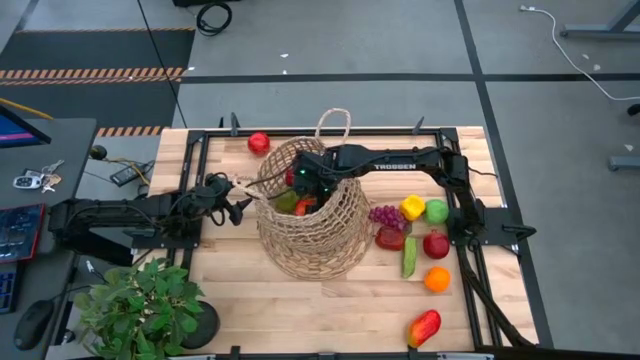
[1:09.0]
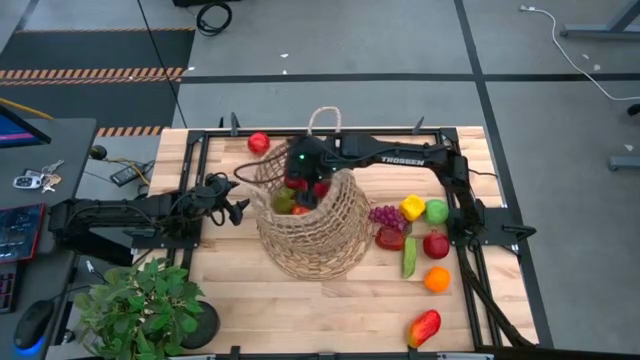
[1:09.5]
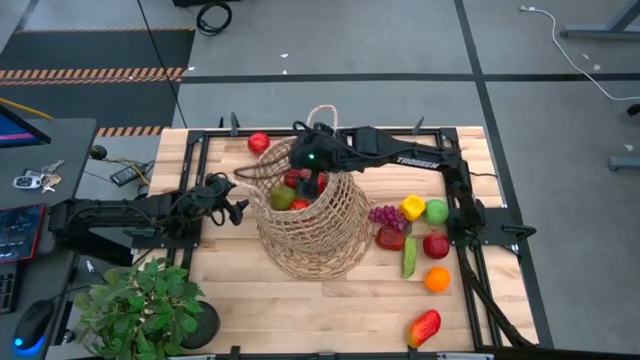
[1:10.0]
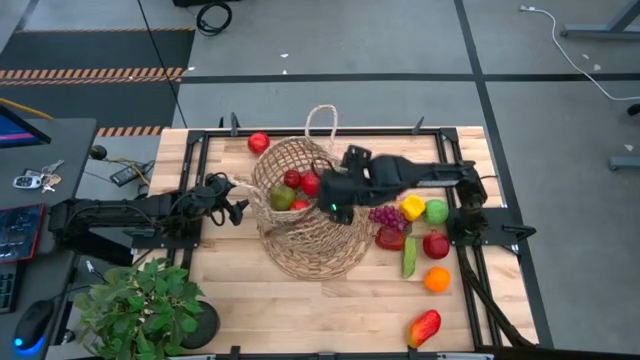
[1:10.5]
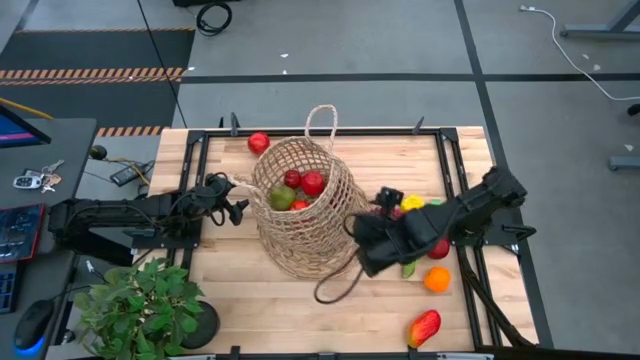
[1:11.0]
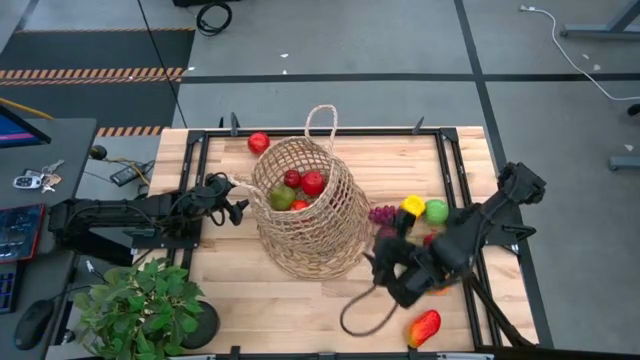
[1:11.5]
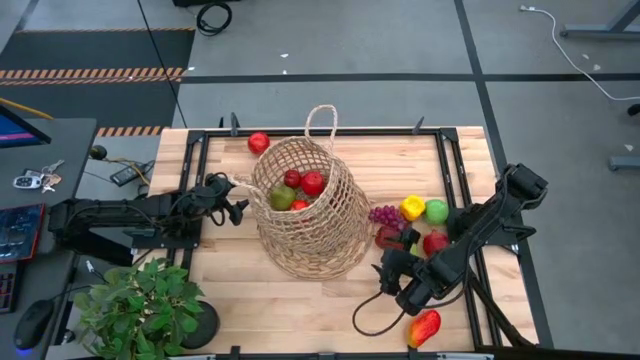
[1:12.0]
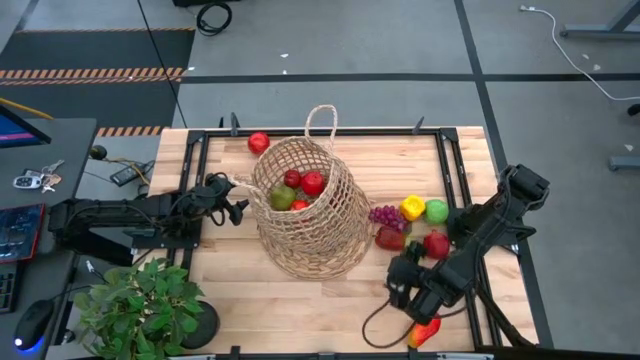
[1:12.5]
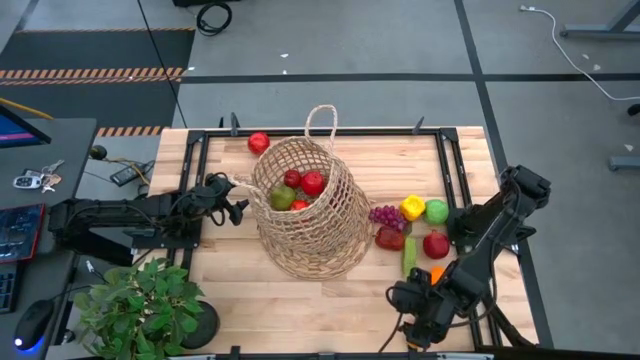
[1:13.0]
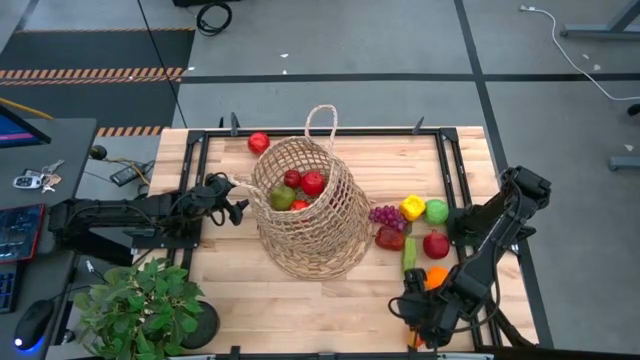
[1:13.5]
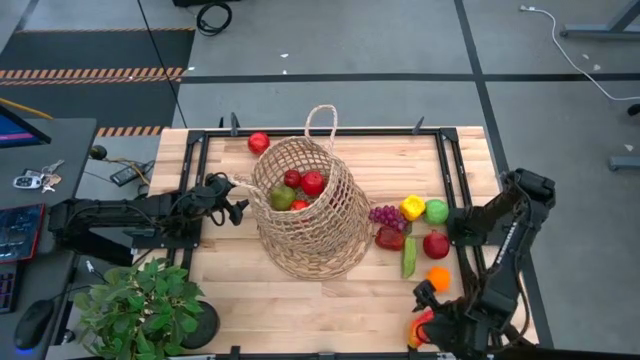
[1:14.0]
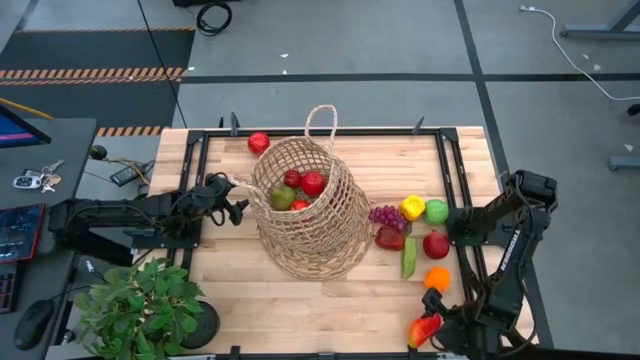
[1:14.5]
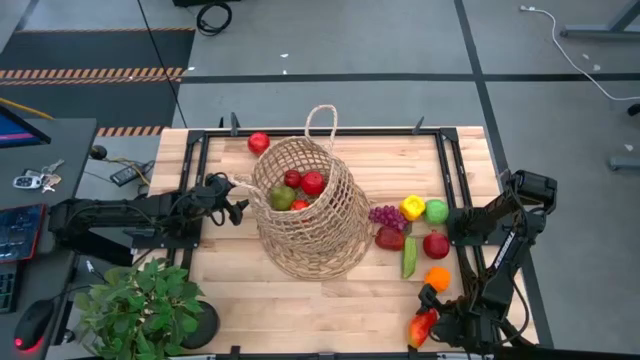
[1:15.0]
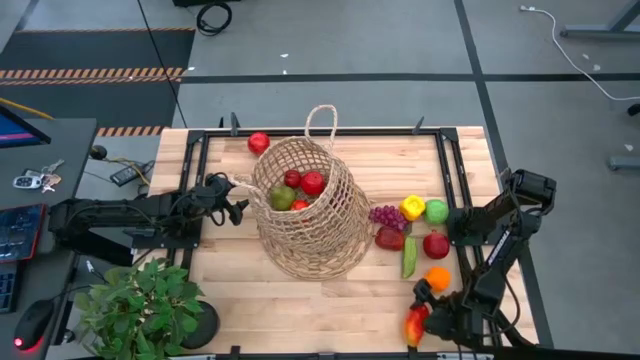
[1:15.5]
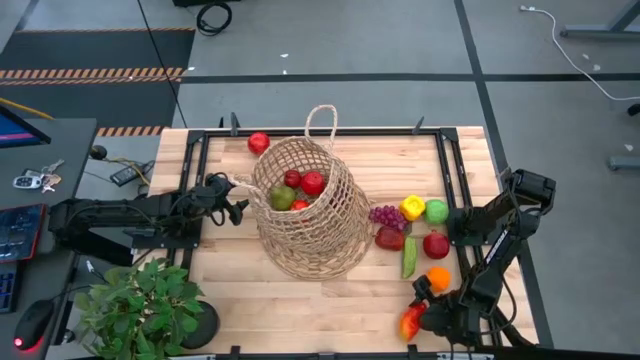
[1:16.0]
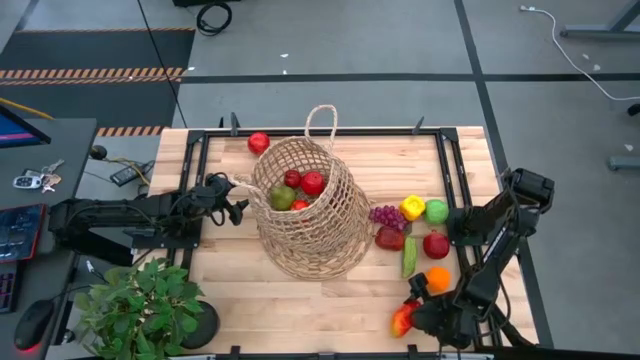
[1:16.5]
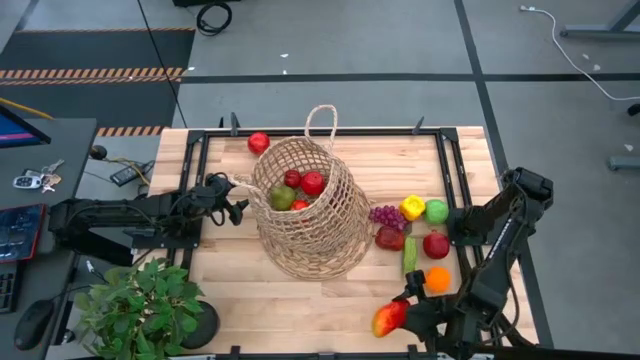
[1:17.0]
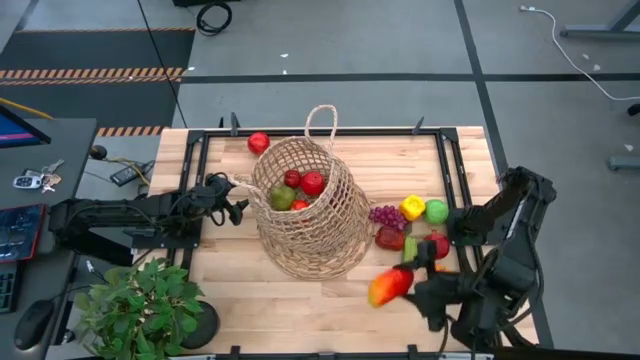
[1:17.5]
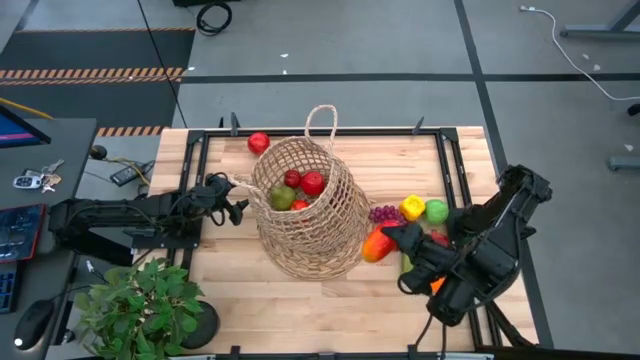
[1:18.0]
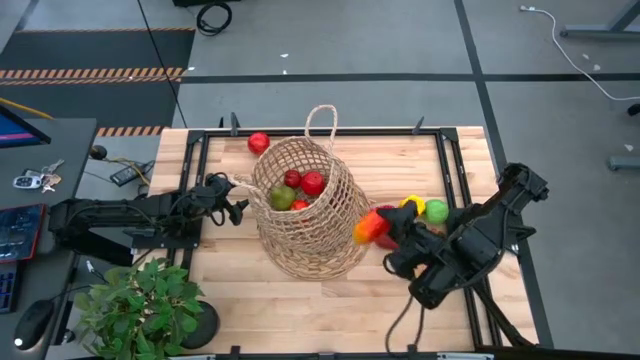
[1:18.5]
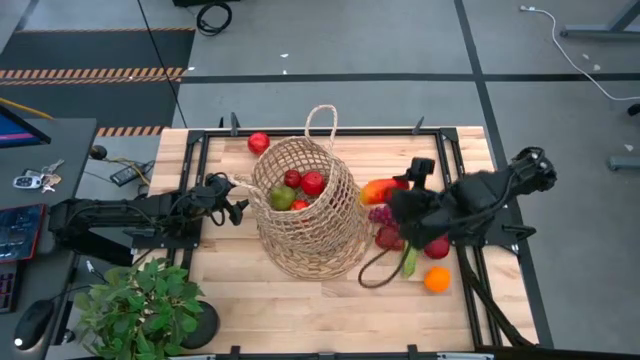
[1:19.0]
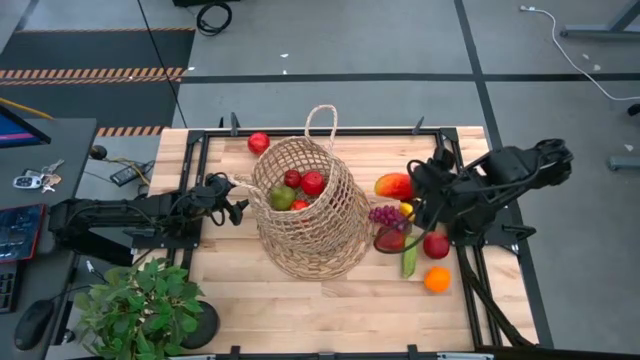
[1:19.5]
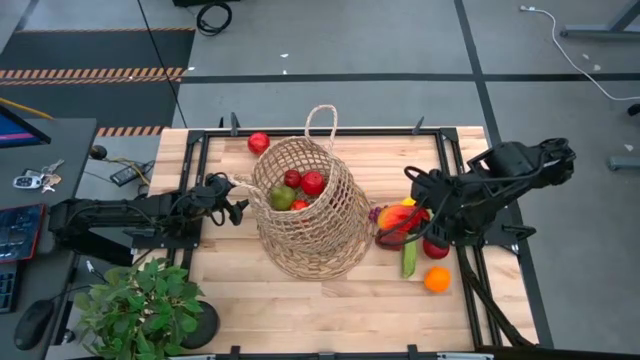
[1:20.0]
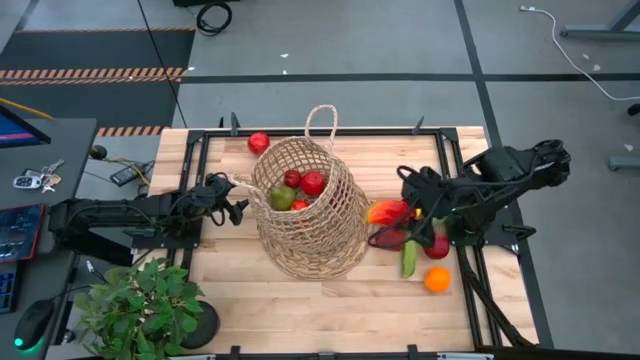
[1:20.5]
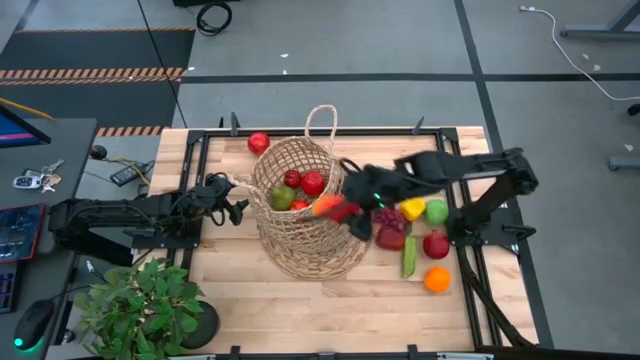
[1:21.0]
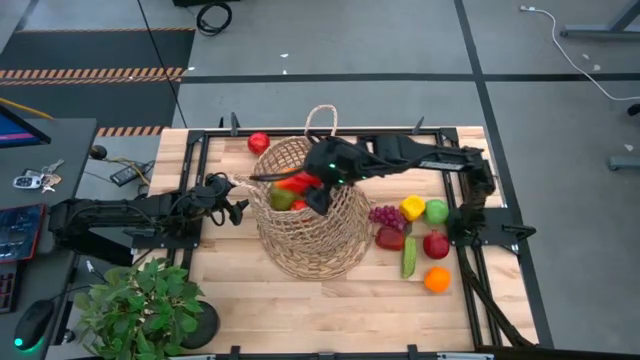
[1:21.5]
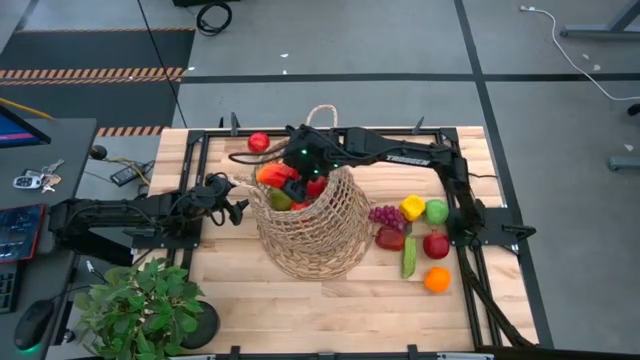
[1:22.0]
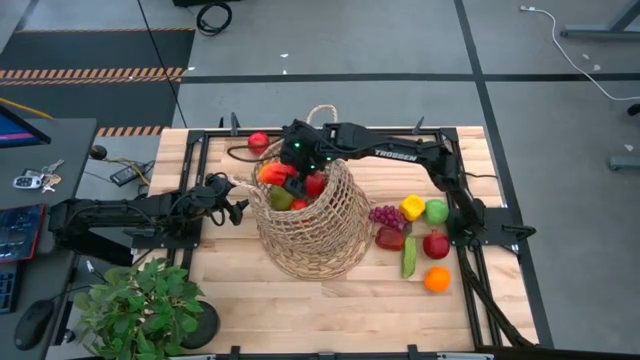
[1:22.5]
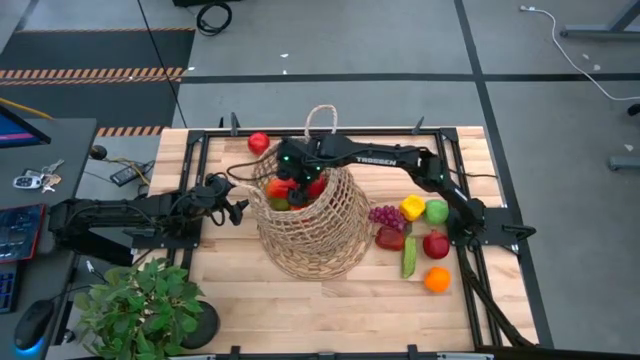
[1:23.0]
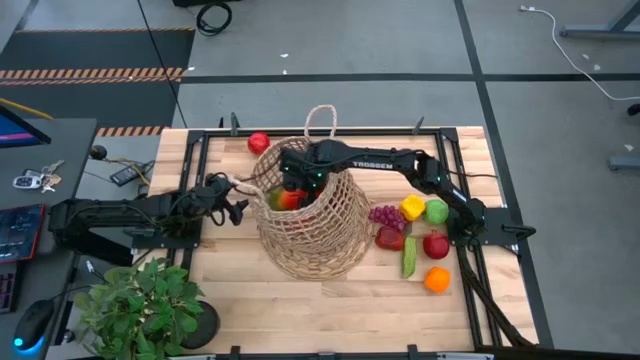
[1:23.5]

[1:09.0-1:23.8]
Task: Build produce basket
Put the orange mango into the basket

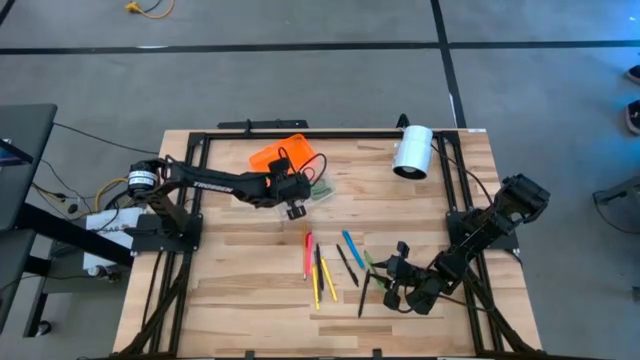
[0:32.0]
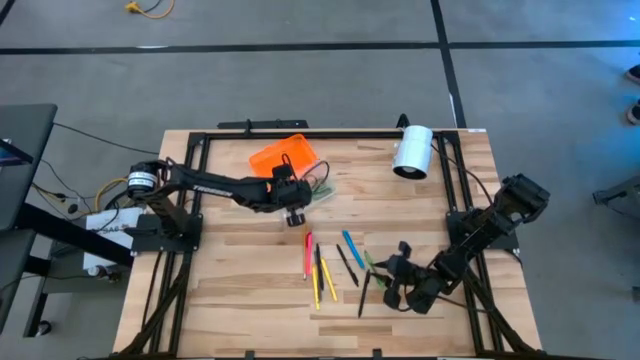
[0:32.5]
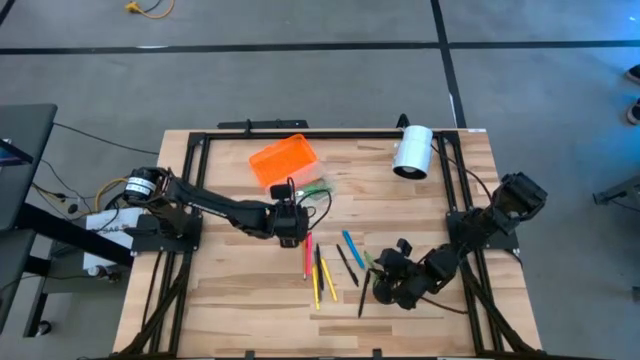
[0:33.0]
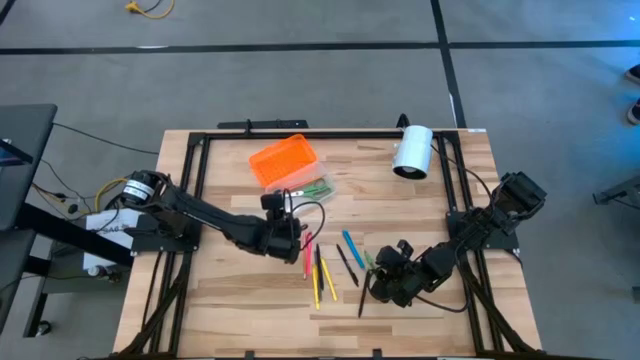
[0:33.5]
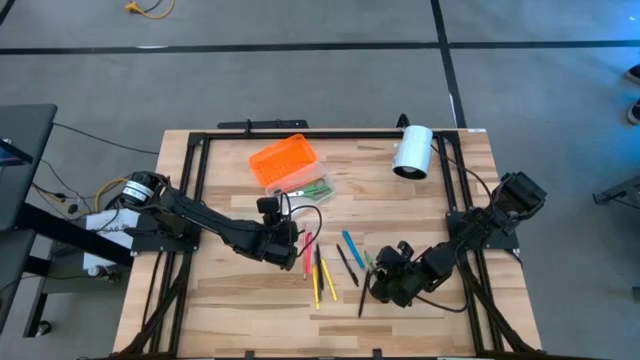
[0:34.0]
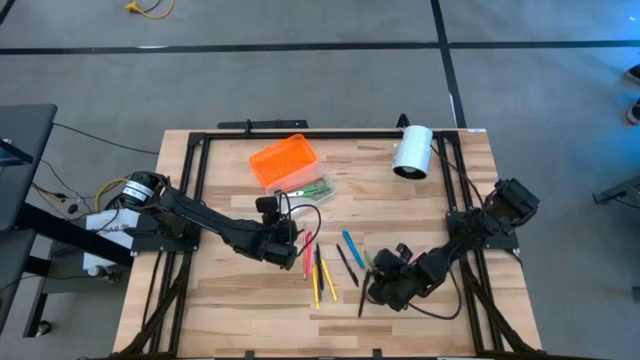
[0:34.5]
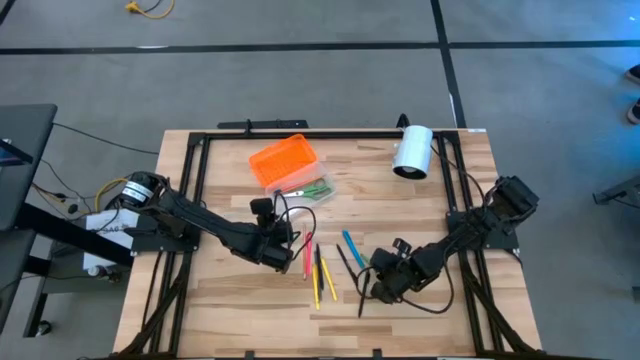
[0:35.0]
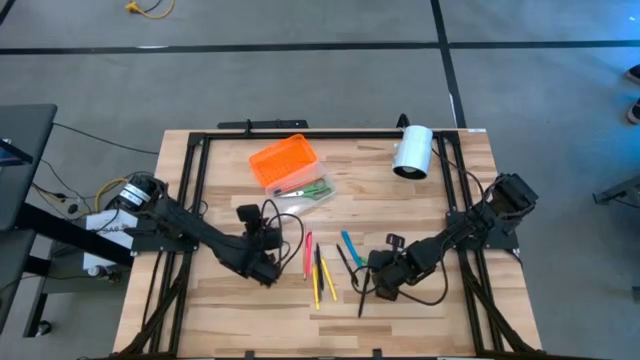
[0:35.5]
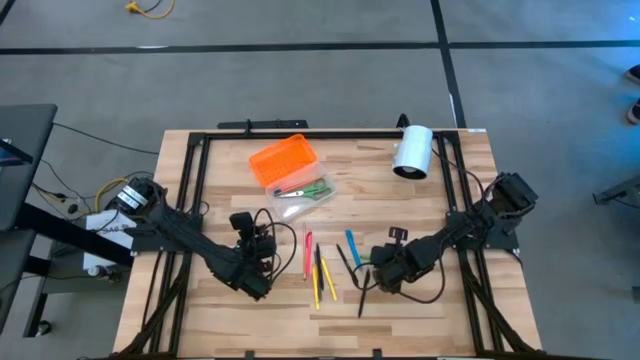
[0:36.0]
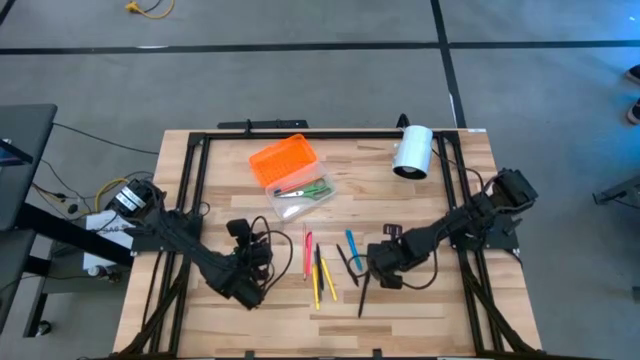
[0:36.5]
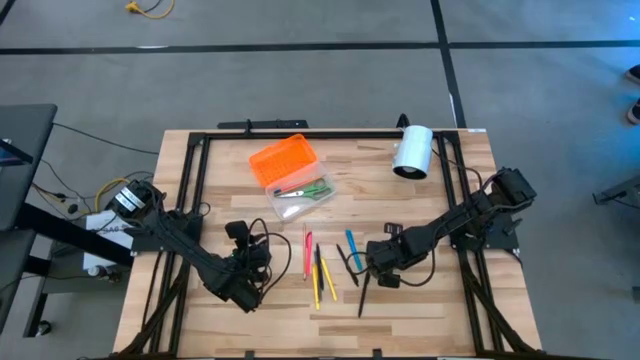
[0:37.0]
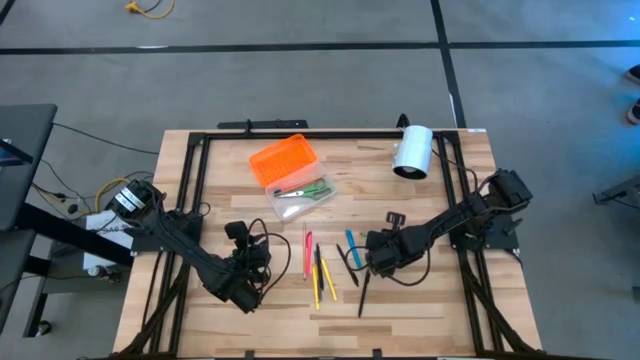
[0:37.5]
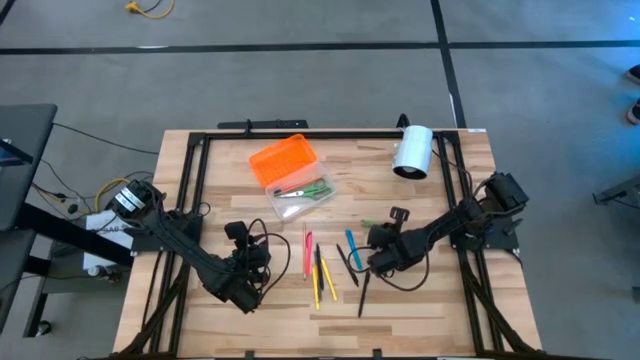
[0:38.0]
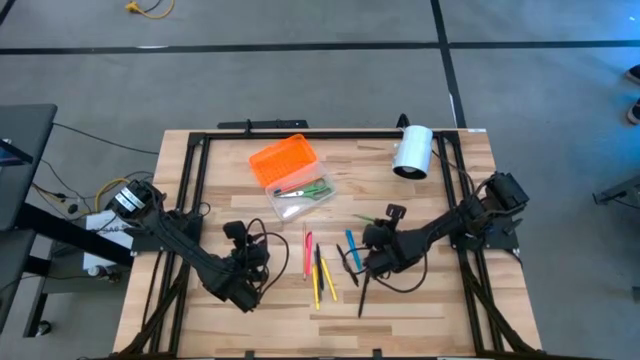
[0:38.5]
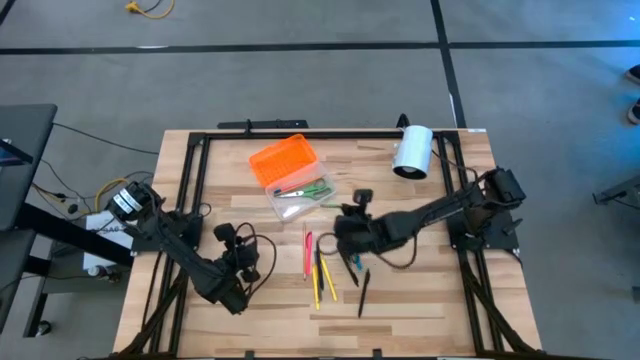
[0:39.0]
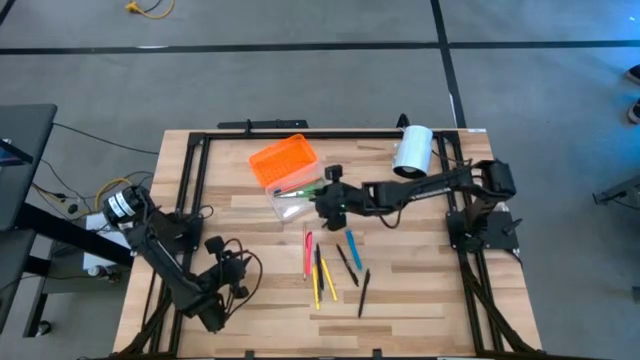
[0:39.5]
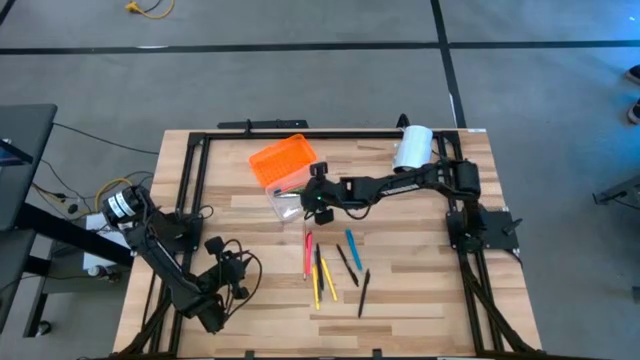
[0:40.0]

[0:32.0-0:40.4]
Task: Pick & place school supplies into a supply box
Put the green pen into the supply box
